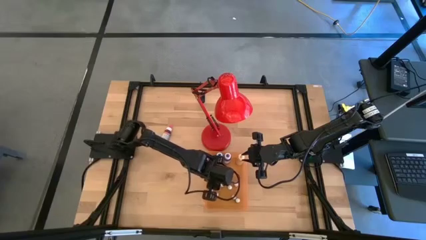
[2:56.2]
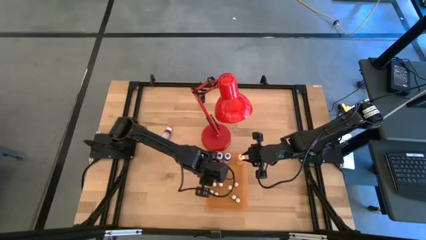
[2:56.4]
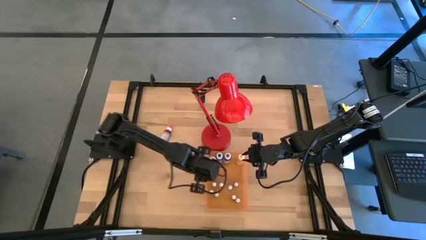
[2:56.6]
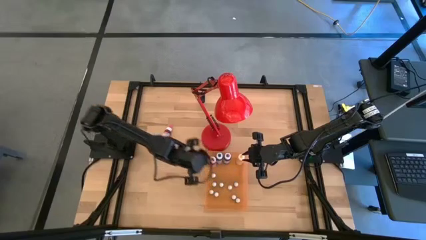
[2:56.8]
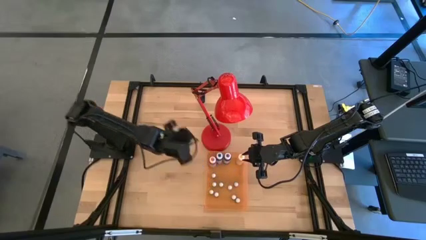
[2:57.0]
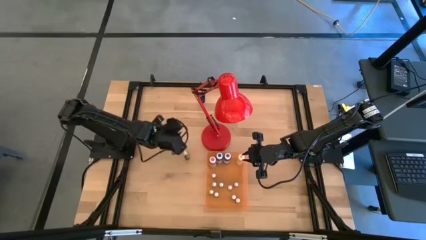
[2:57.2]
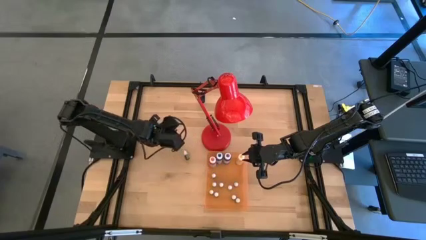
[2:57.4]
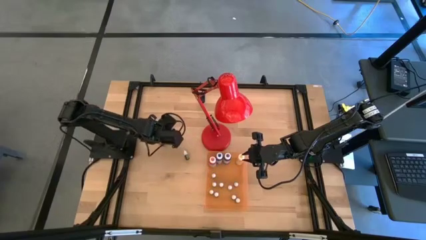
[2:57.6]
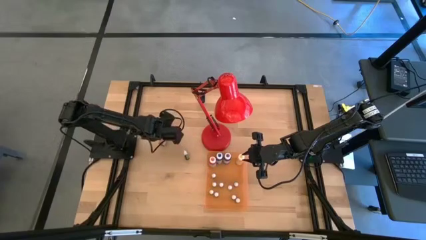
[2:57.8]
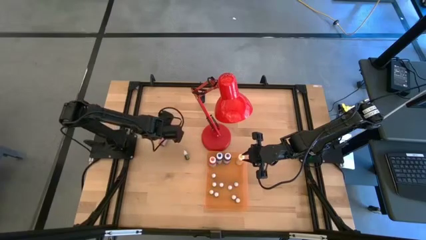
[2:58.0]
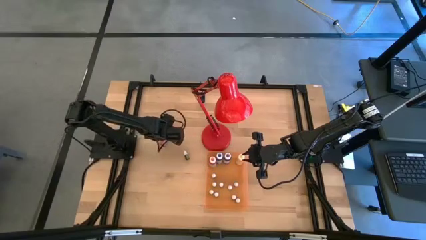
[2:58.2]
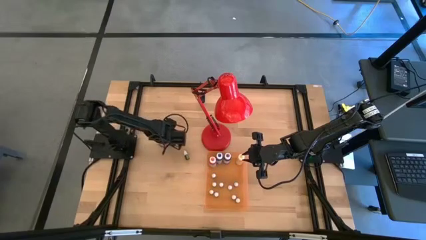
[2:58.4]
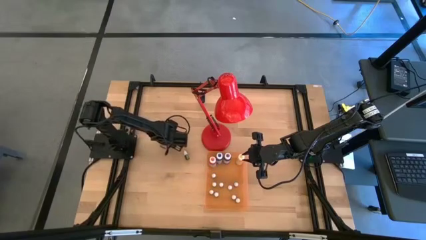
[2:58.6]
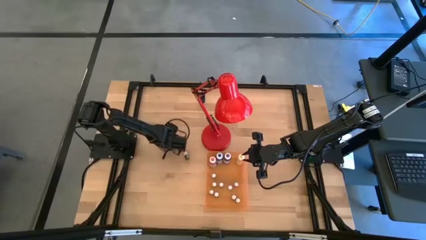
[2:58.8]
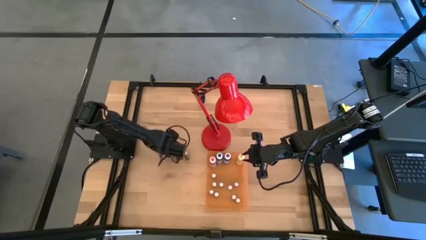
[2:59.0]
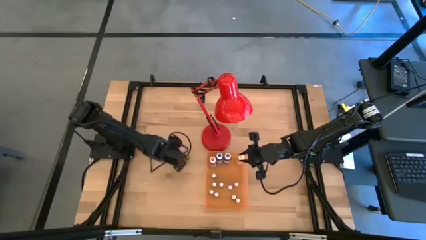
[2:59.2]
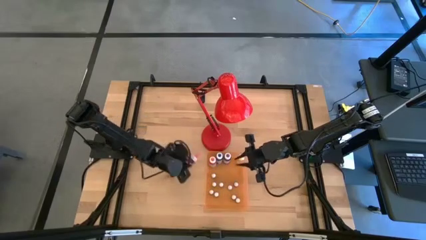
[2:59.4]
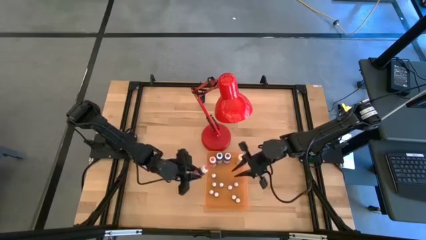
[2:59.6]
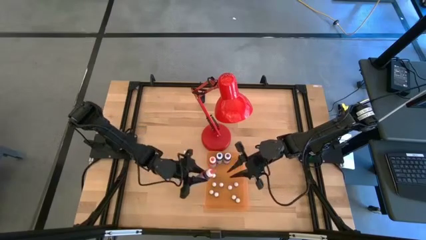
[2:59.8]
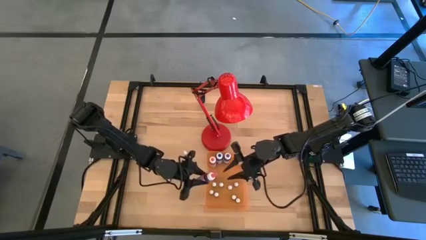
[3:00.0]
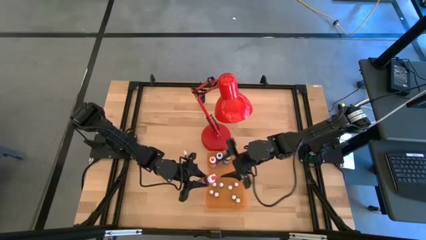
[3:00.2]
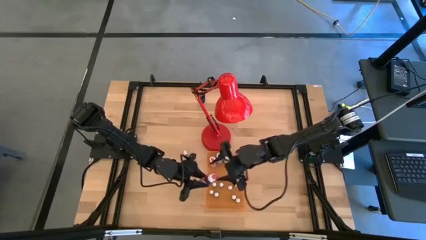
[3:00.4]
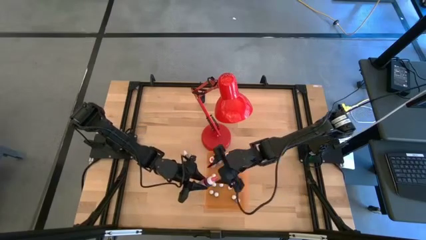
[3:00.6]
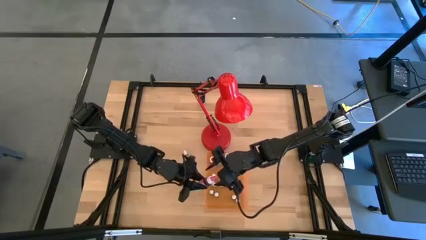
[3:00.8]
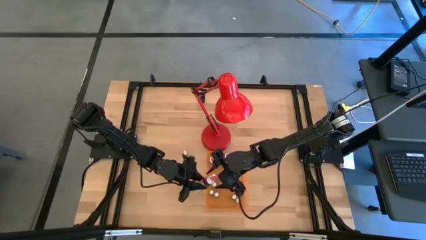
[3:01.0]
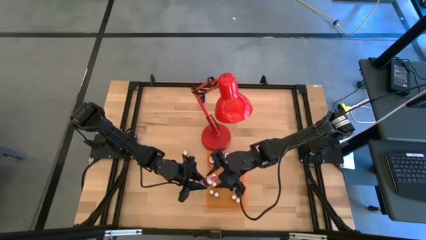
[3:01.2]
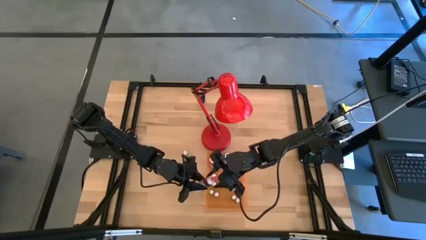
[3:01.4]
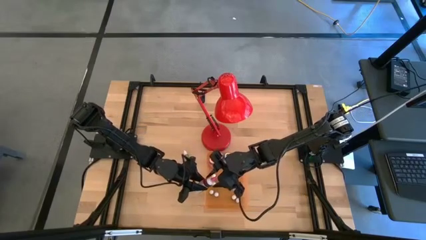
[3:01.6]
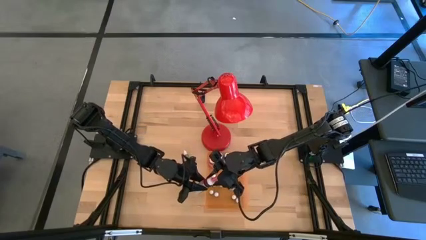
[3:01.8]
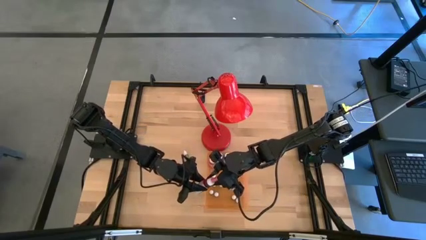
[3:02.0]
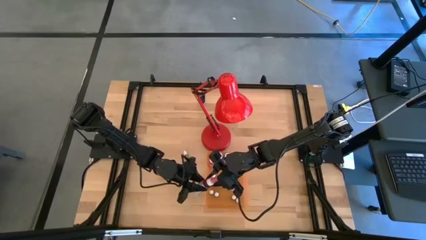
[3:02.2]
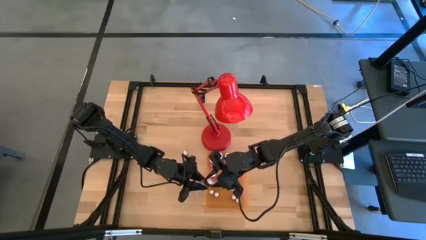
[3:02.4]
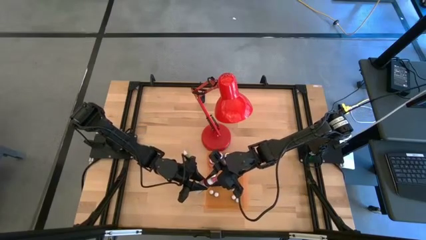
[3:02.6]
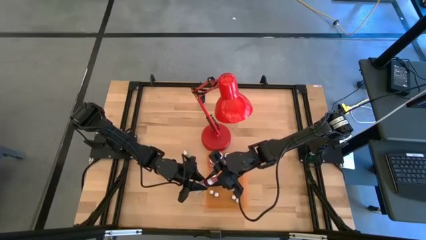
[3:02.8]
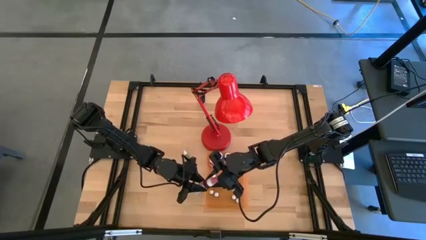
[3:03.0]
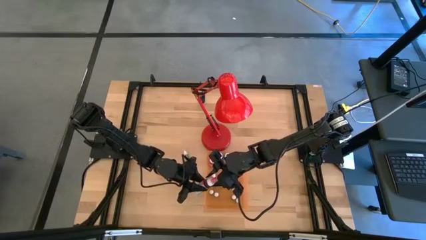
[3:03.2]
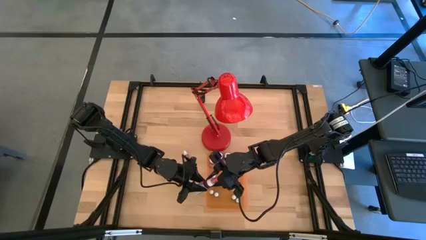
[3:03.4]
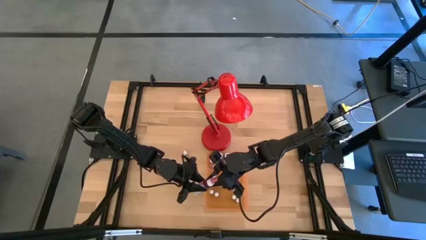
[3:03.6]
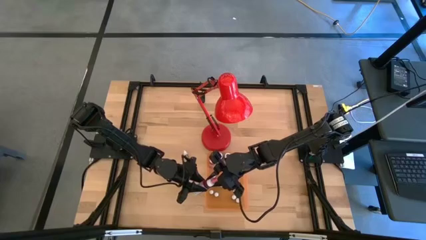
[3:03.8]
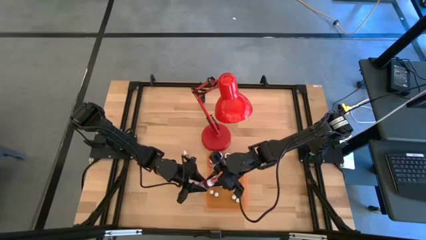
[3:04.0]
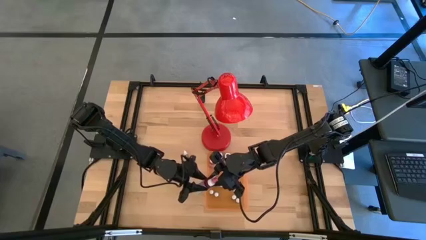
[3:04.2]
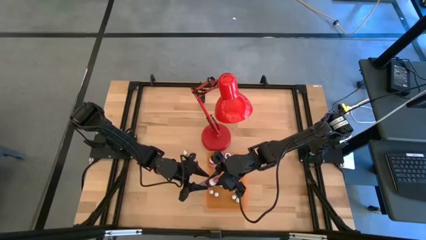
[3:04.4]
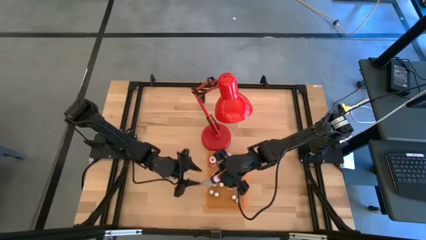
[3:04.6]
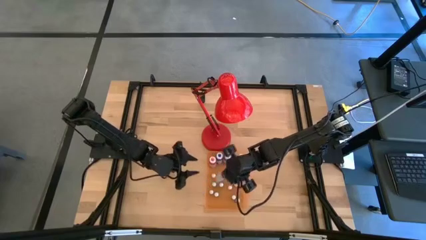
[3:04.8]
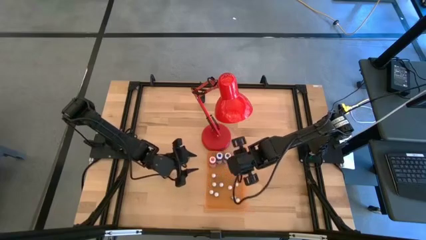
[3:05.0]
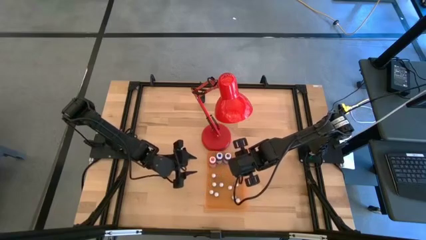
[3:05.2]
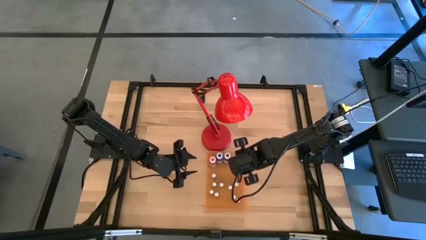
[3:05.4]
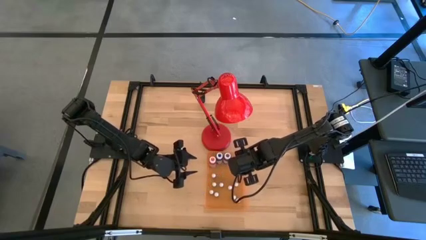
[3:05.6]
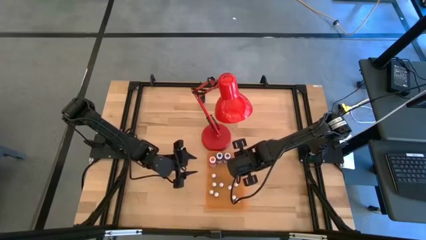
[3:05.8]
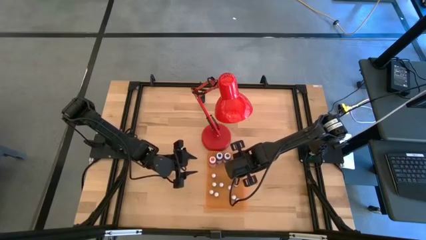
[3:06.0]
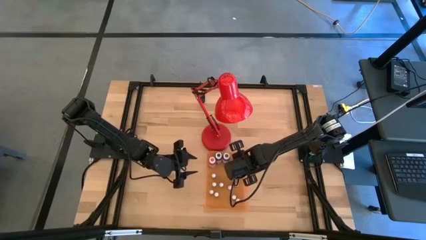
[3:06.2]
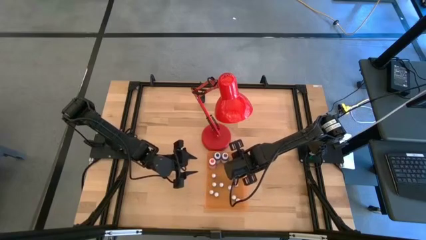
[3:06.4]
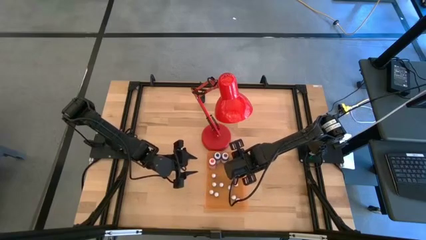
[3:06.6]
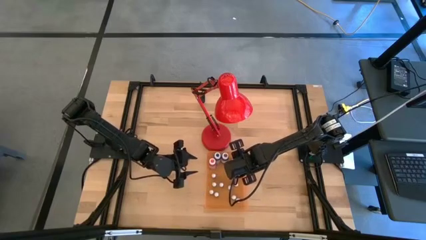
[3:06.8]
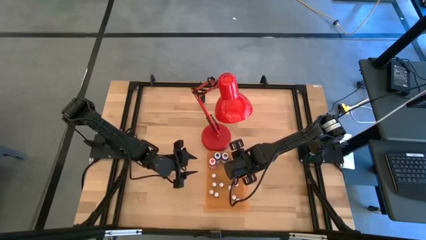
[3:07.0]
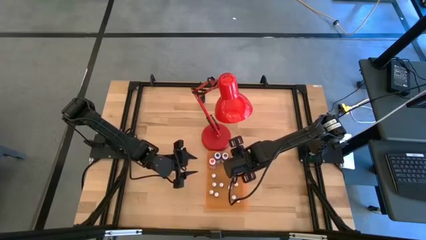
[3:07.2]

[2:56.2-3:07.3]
Task: Pick & Place food coloring
Put the large pink food coloring bottle into the orange bin

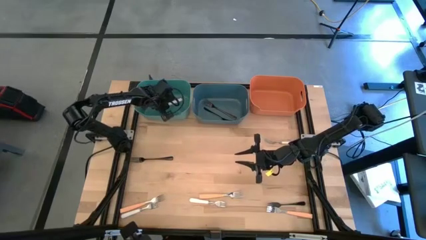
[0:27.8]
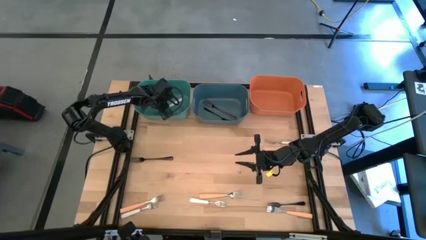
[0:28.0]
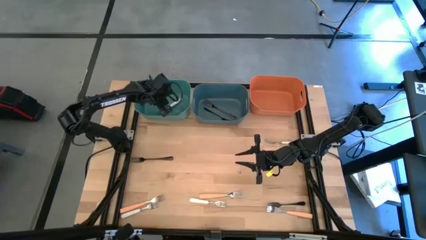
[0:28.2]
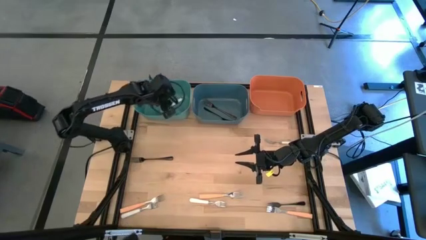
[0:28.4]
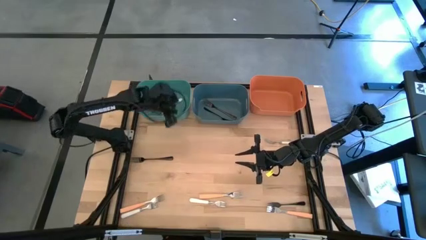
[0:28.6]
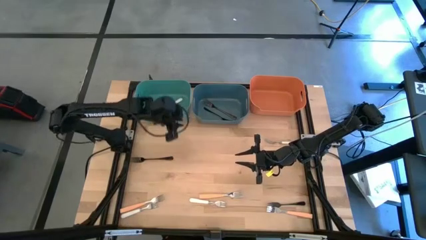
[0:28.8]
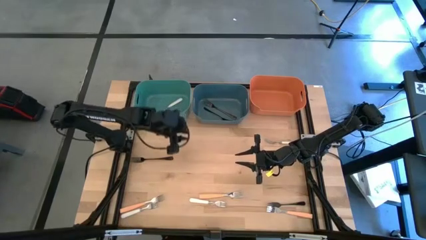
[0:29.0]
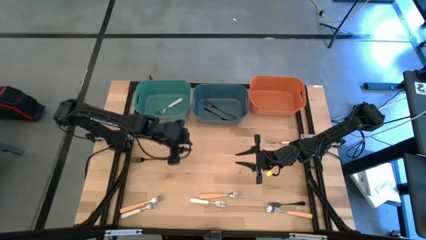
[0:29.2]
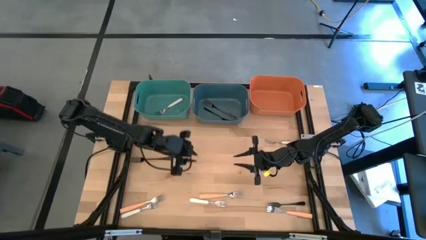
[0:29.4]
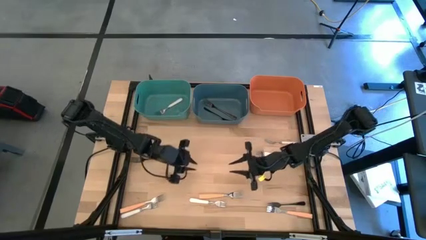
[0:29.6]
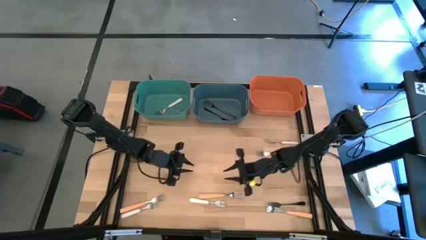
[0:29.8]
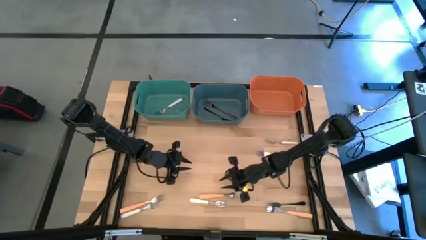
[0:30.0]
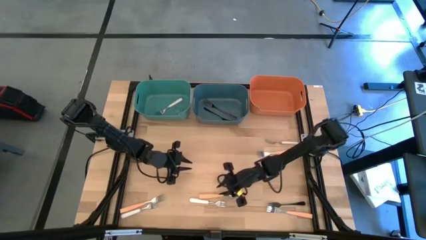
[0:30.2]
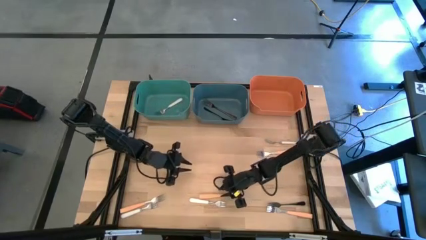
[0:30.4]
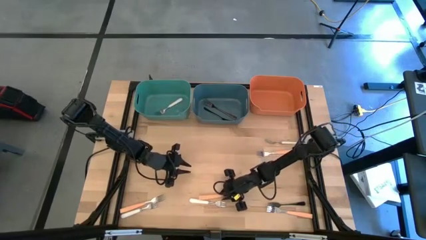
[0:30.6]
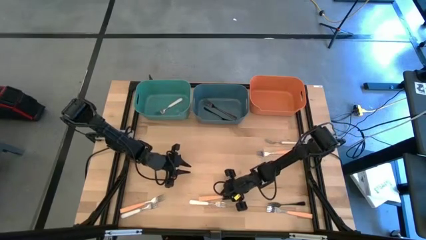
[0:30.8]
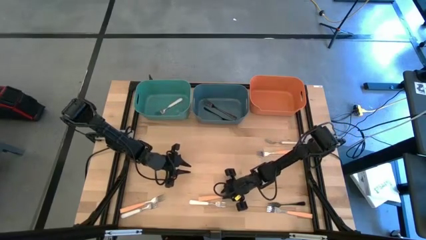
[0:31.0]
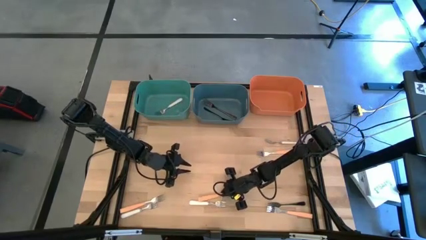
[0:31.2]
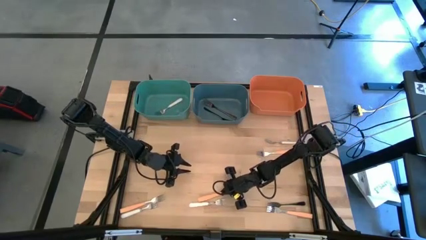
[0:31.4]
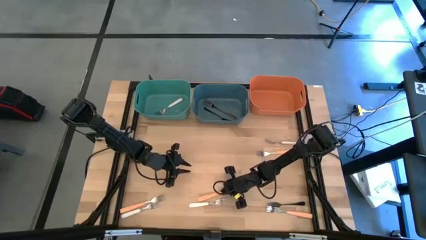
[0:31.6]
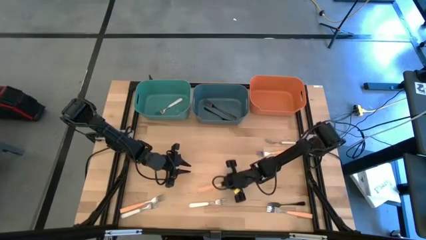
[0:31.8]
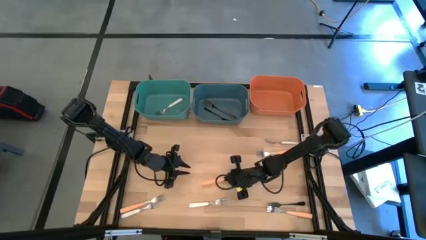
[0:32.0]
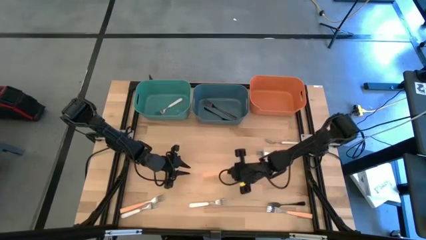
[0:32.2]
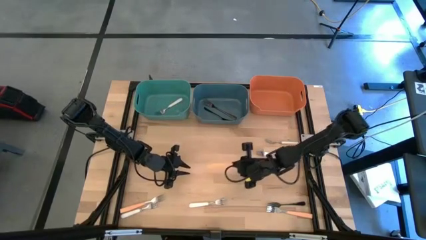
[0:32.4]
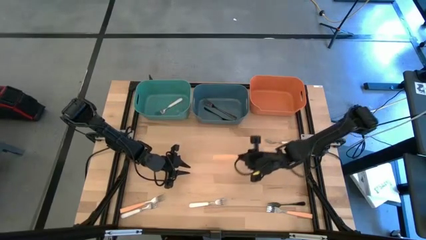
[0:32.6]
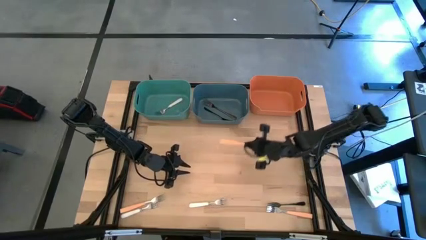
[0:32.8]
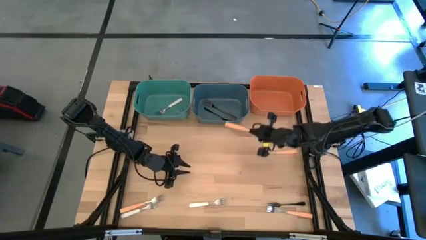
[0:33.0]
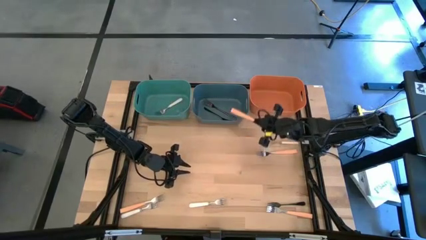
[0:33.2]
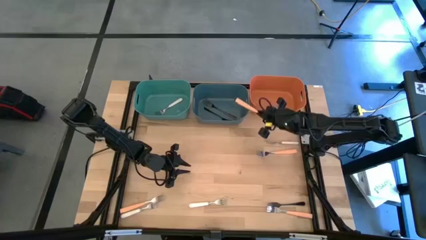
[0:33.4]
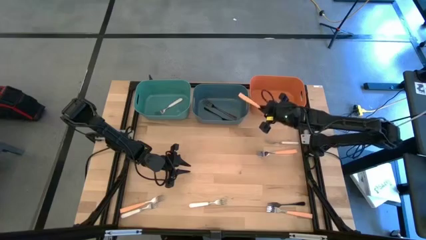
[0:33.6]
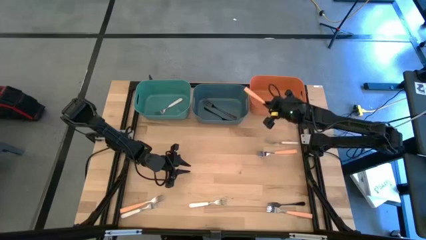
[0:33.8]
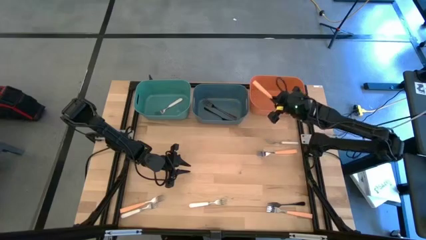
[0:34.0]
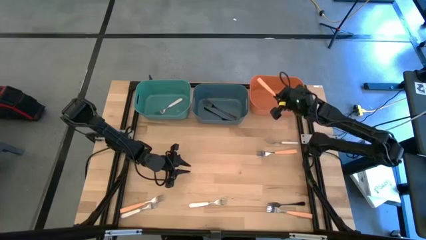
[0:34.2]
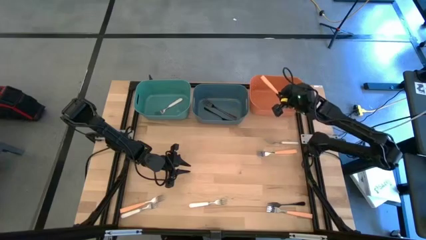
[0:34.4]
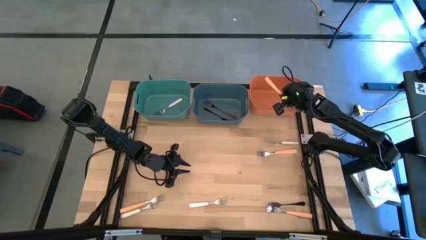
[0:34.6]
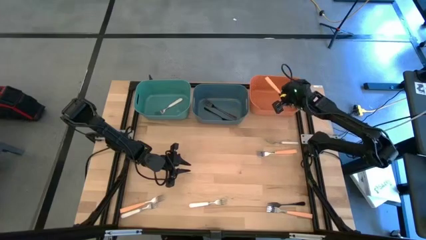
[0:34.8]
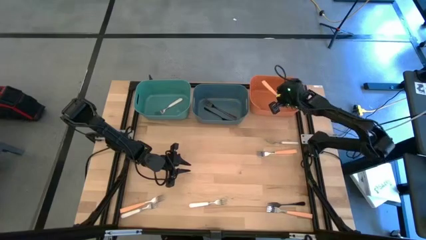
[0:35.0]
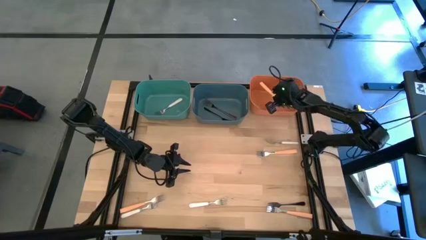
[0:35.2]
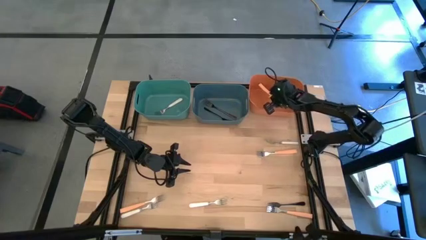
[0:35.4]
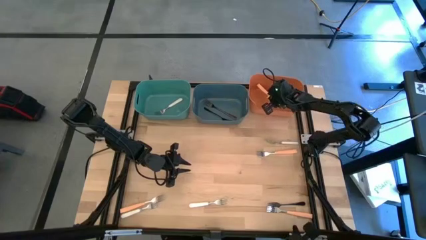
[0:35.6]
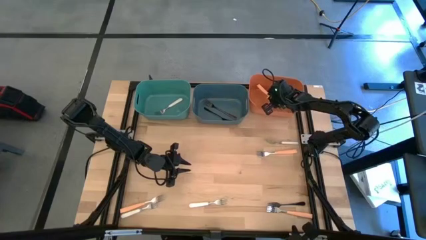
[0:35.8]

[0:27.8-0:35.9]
Task: Sort silverware by color (type)
Put the bottom middle orange fork into the orange bin
